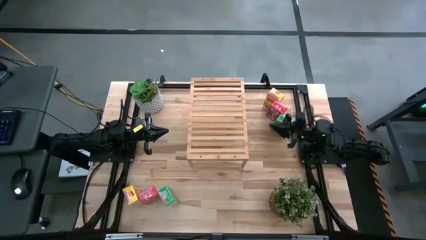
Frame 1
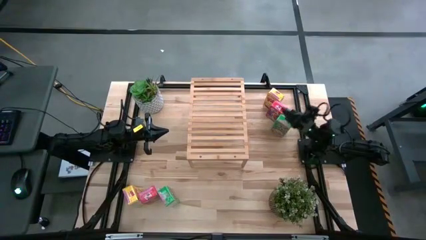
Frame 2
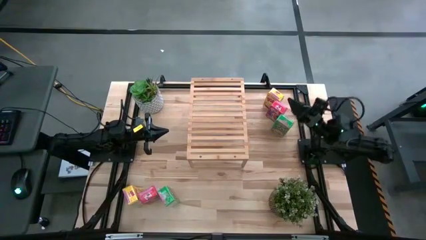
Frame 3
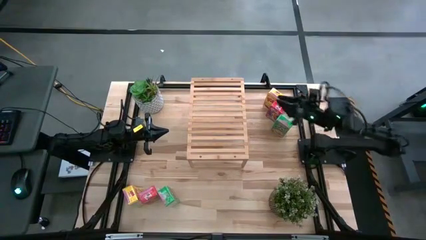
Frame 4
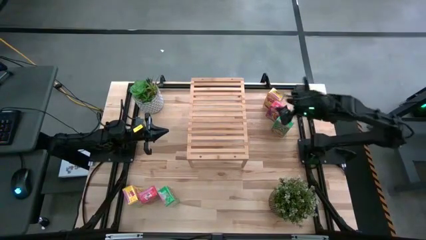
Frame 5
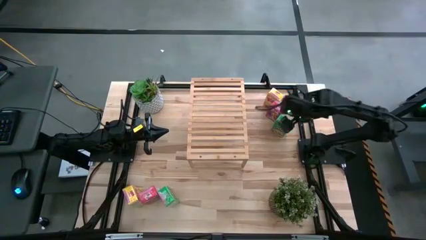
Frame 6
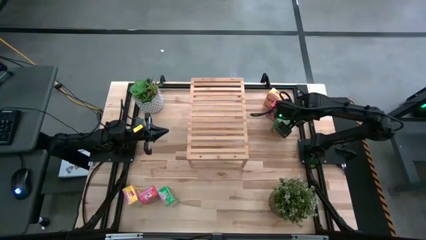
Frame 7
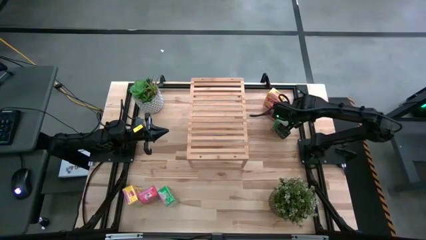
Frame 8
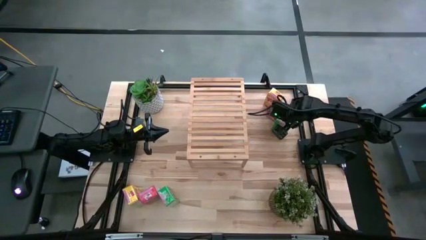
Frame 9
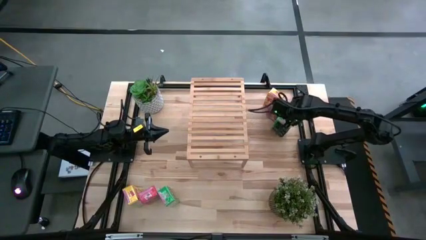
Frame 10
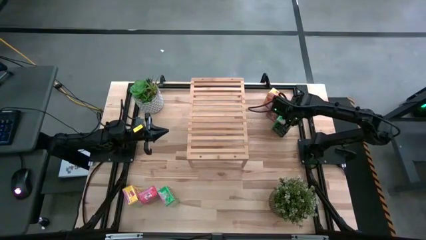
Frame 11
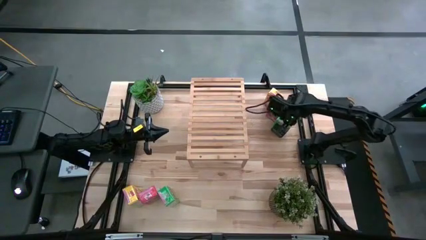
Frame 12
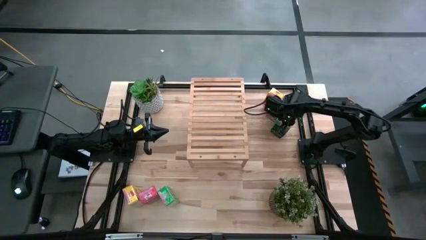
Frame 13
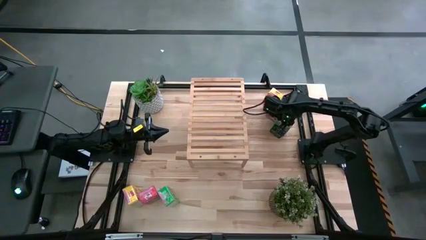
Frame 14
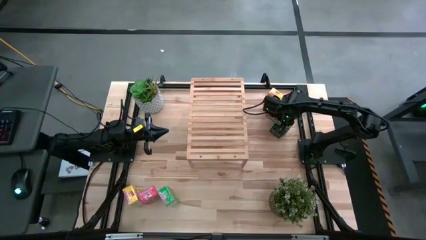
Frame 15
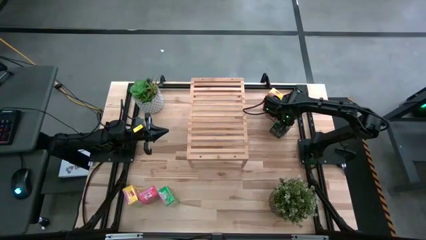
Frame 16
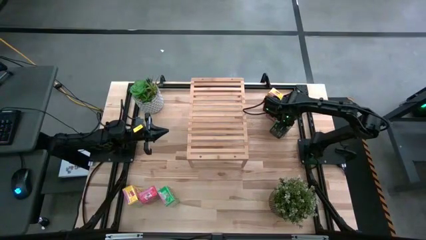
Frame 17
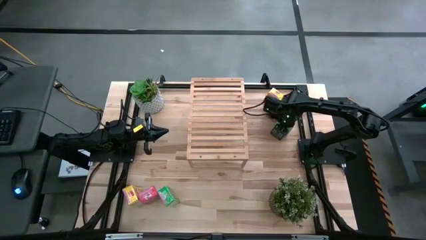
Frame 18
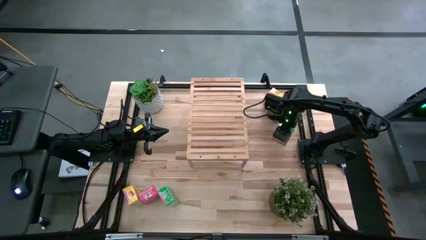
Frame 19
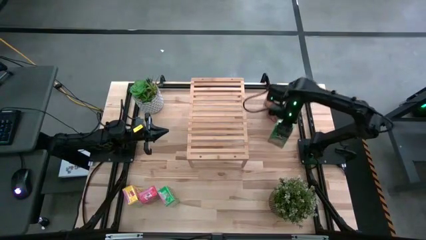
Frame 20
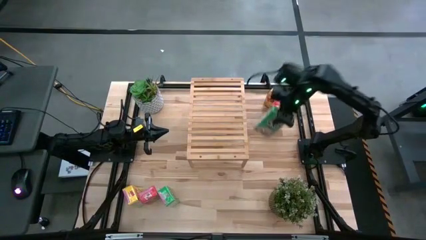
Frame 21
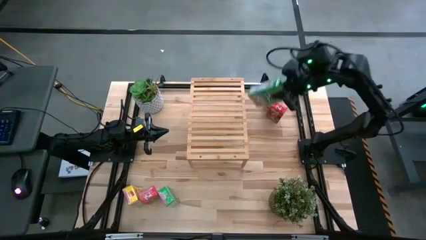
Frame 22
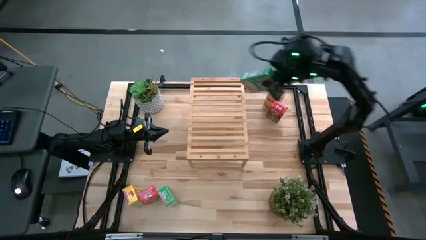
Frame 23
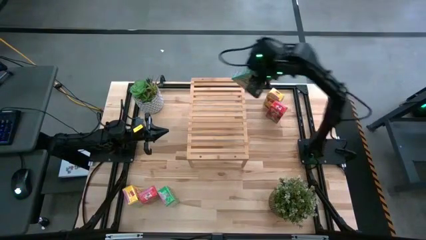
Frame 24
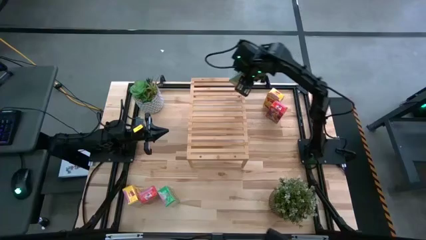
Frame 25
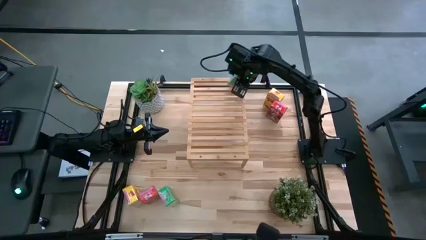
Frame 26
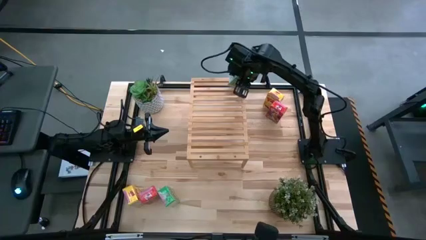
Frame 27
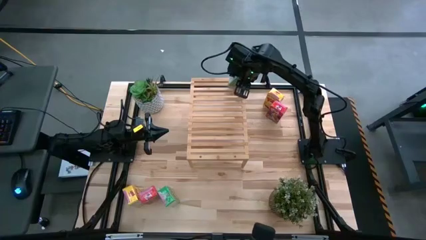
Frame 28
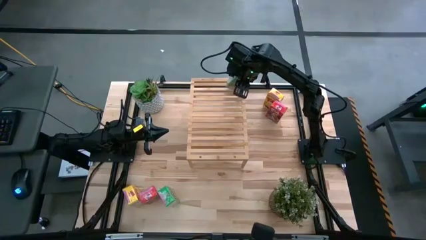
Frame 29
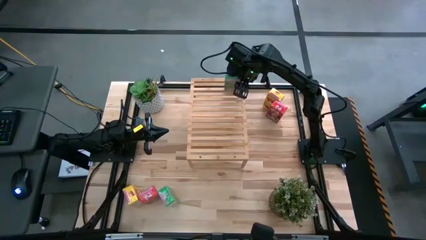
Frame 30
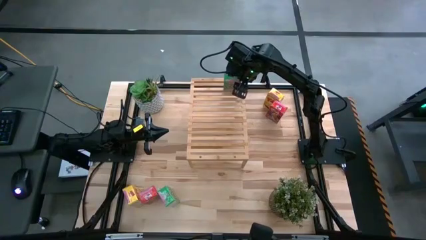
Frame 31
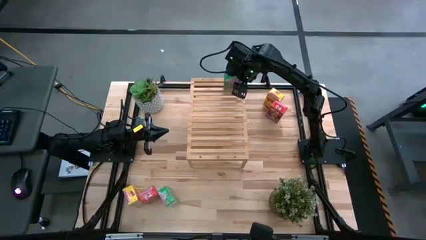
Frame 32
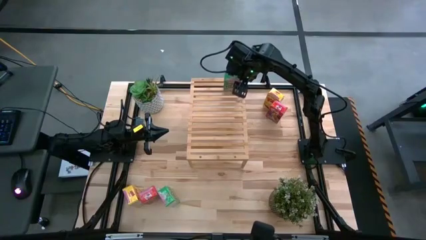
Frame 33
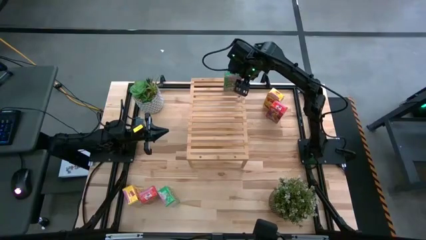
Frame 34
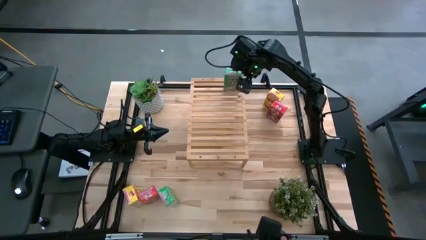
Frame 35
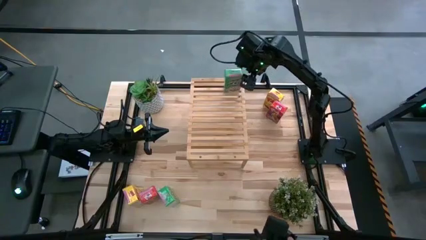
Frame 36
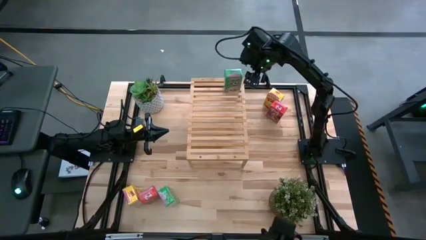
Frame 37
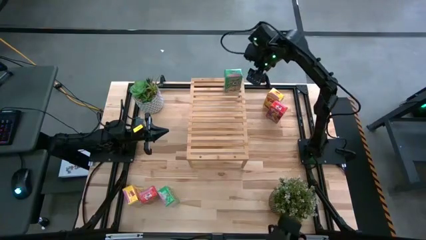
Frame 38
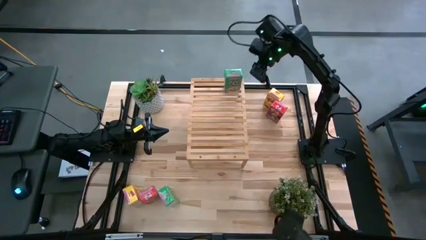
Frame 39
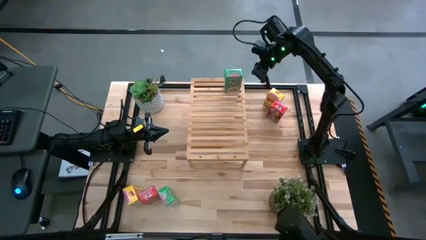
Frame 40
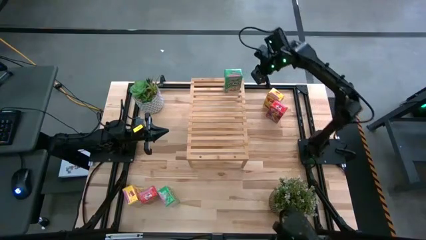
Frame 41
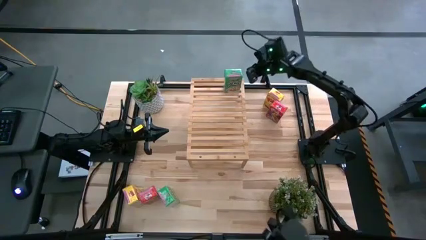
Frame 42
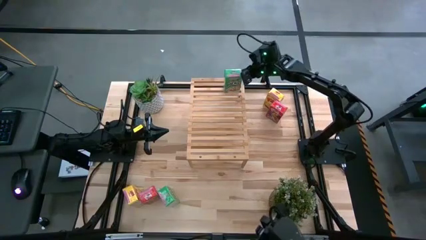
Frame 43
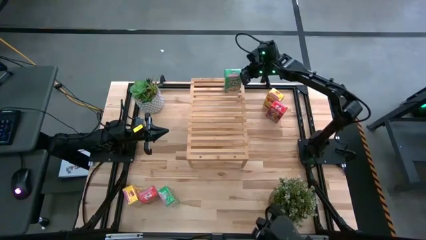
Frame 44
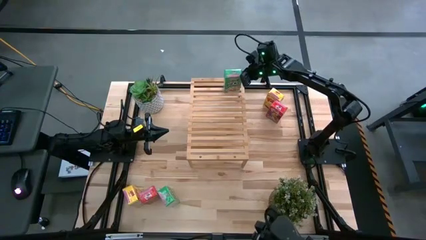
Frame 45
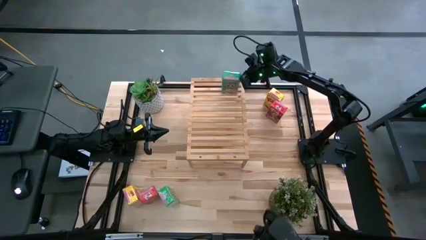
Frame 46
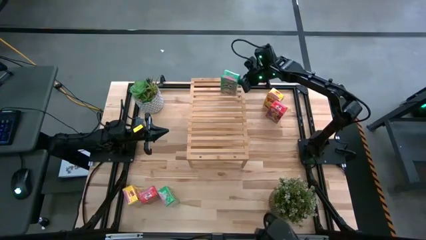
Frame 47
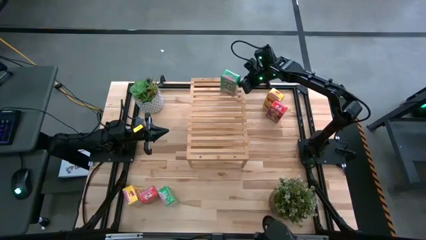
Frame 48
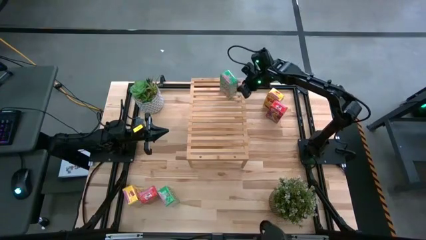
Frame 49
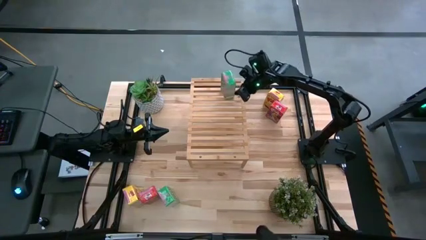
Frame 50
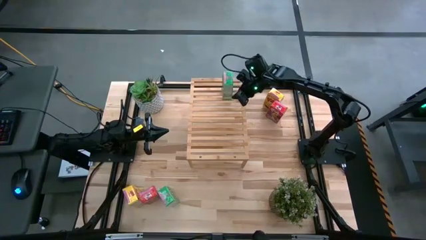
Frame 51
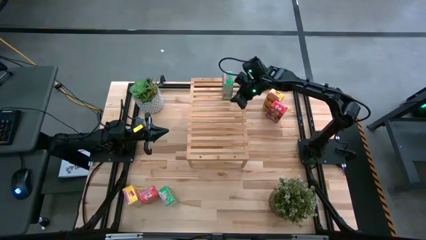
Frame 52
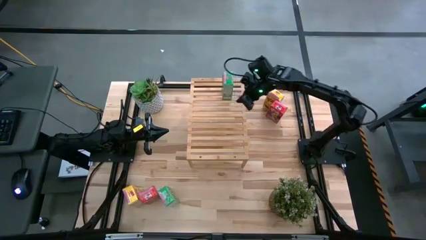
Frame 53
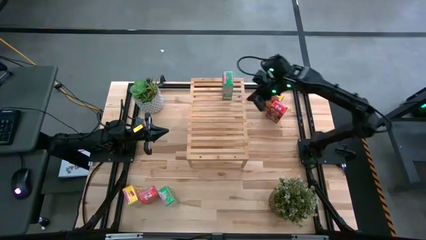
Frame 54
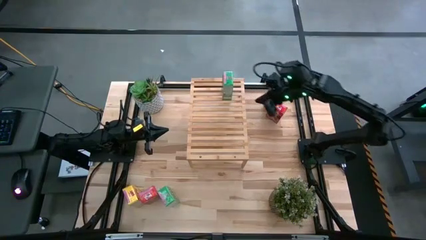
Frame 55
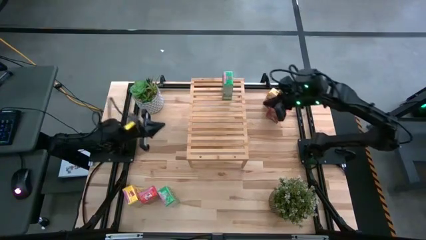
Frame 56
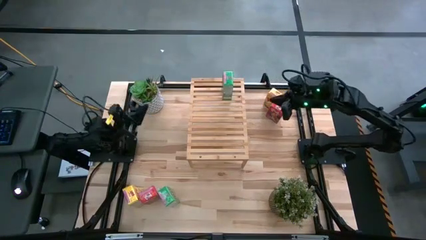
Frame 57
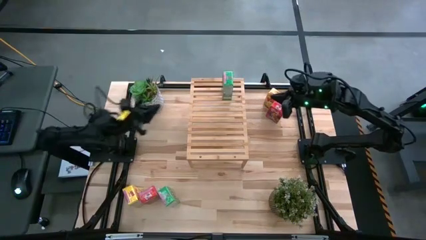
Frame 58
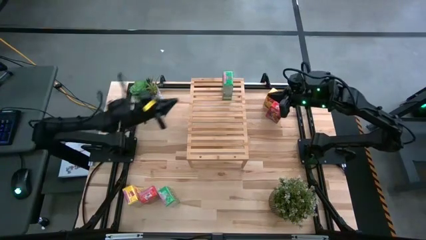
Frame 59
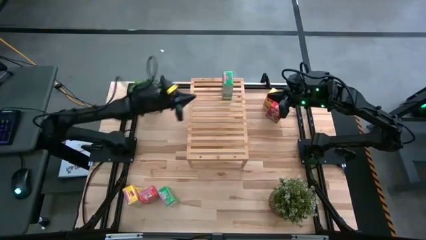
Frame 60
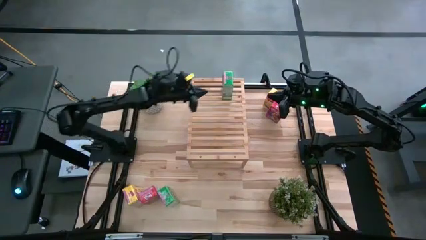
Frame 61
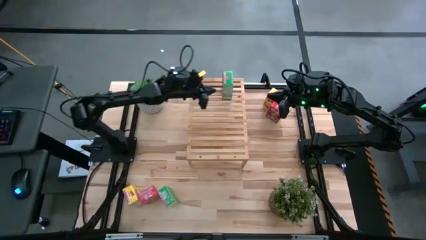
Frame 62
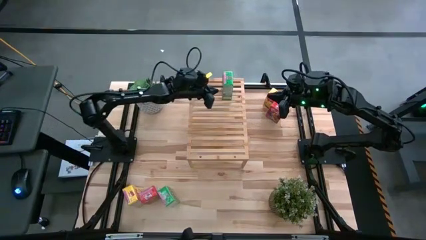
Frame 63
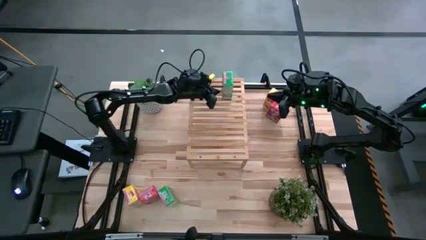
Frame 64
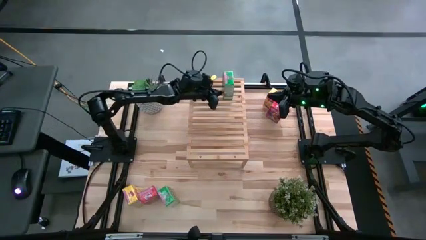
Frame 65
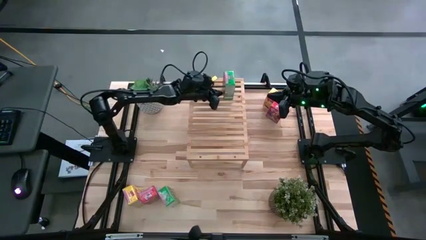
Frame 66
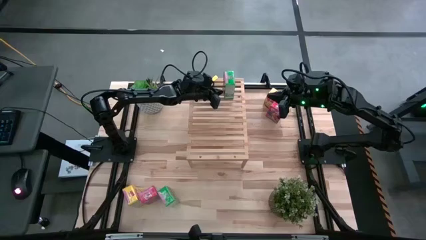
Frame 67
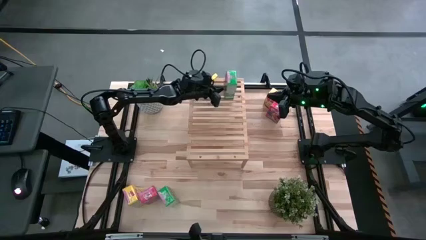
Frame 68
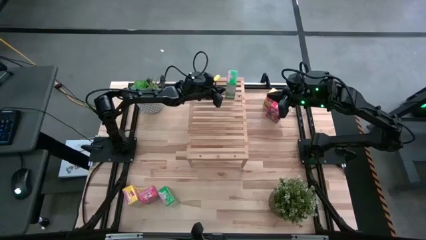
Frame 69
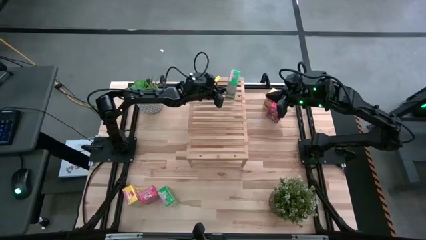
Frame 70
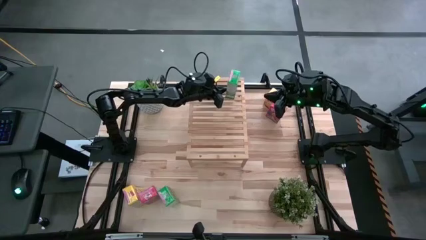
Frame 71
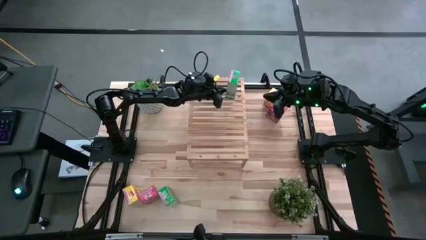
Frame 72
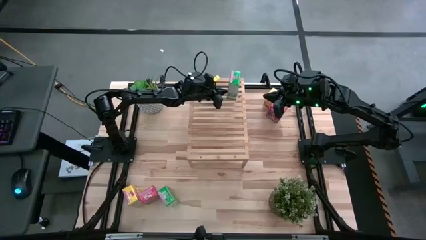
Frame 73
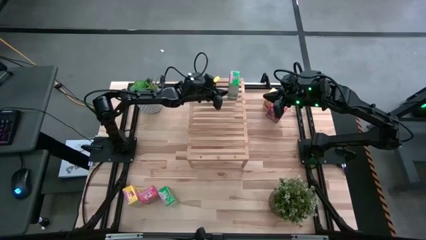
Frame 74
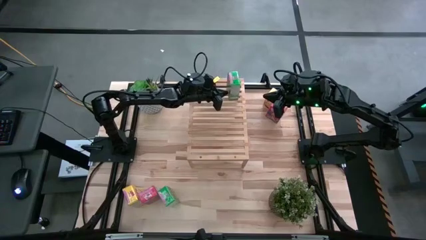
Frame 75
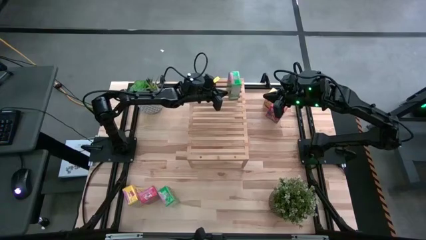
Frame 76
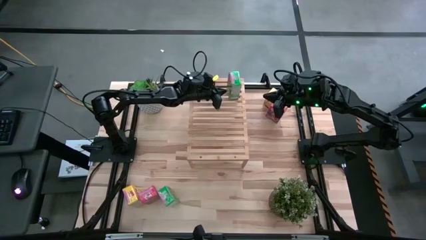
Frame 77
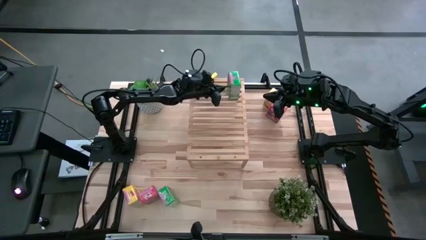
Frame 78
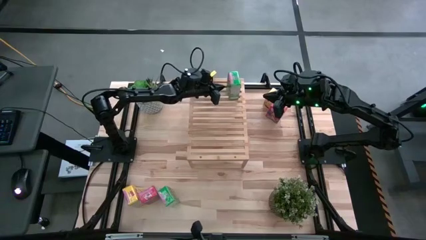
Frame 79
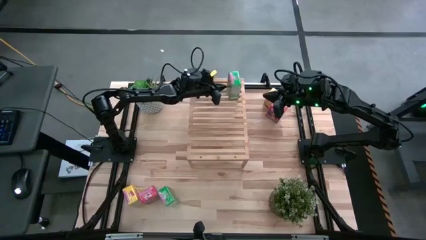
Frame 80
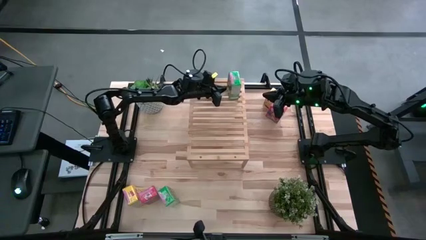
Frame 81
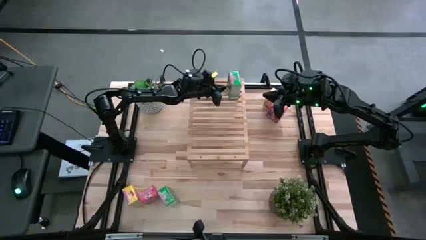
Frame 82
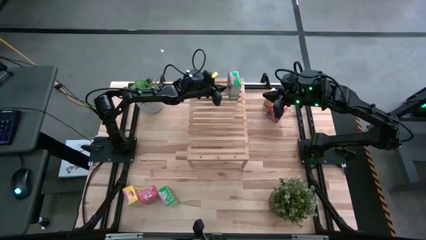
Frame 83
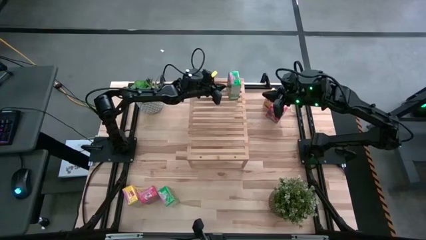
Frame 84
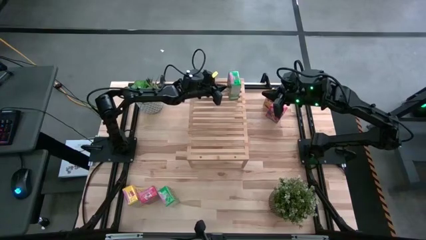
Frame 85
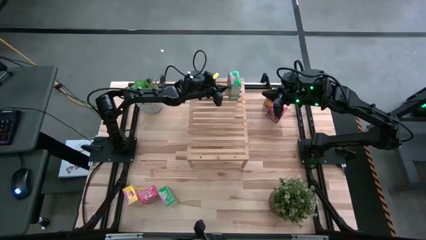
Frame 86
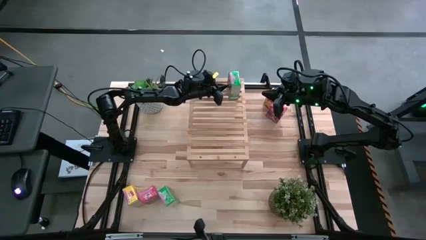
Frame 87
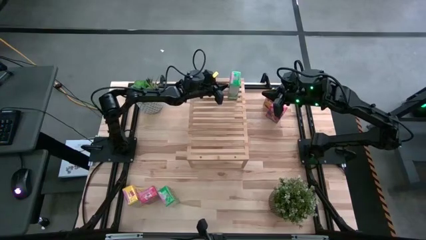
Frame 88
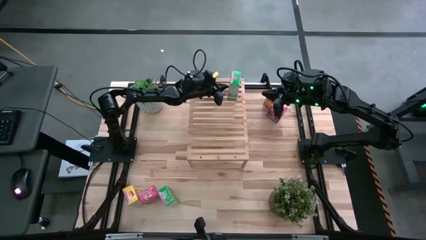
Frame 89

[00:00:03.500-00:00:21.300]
Task: Stack cereal on shelf
Put the top green cereal box on the shelf
